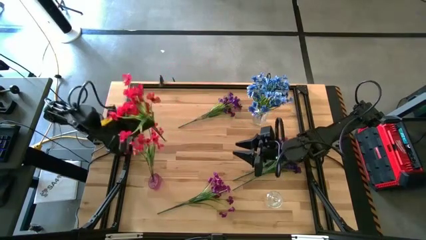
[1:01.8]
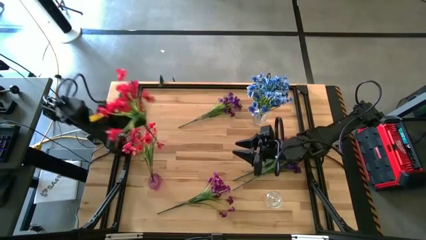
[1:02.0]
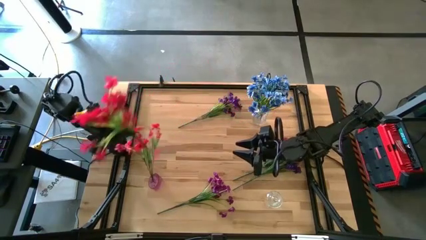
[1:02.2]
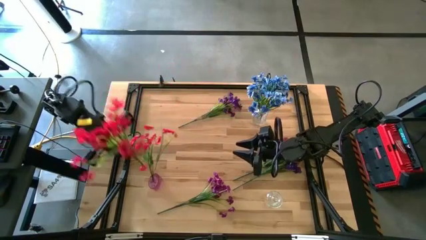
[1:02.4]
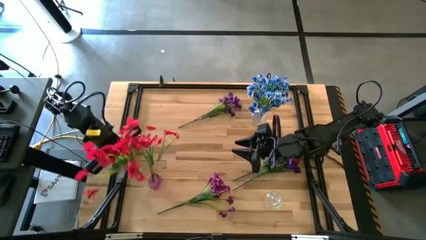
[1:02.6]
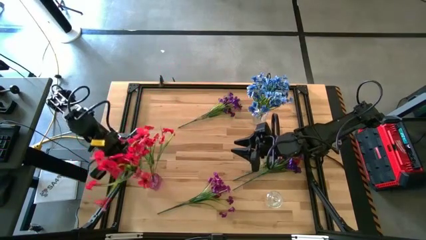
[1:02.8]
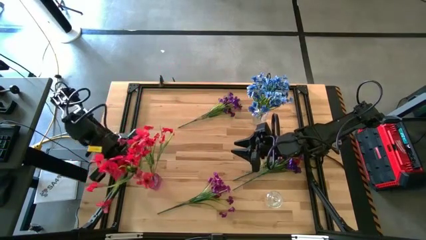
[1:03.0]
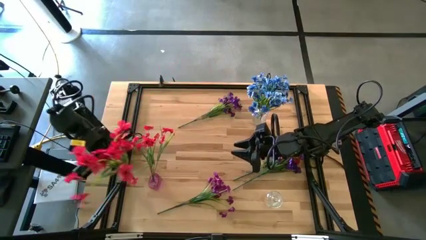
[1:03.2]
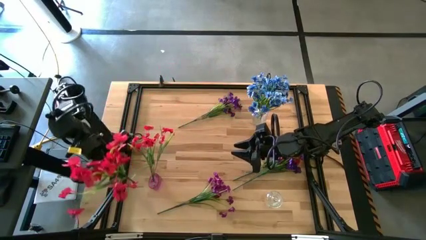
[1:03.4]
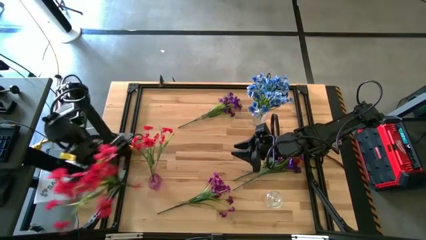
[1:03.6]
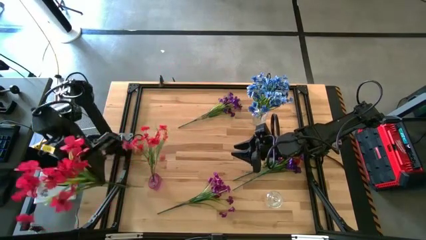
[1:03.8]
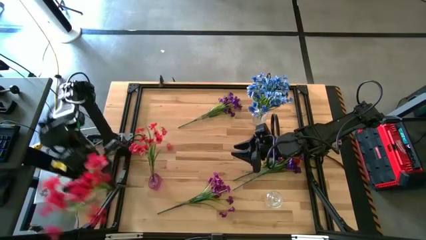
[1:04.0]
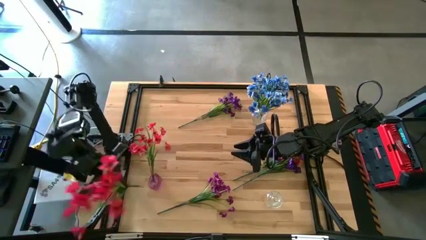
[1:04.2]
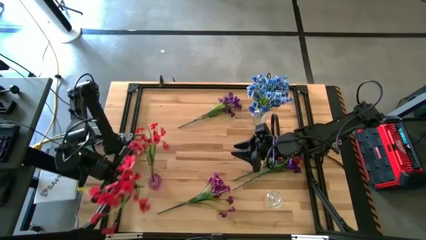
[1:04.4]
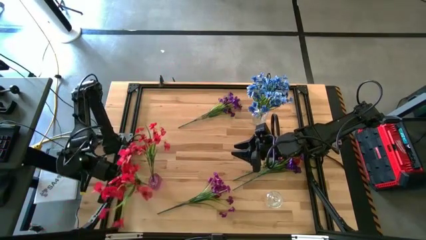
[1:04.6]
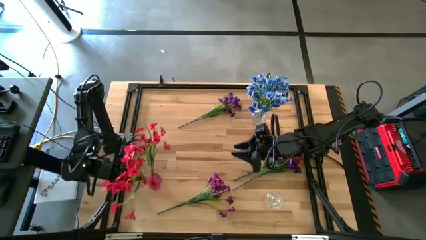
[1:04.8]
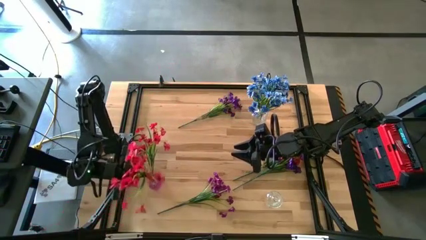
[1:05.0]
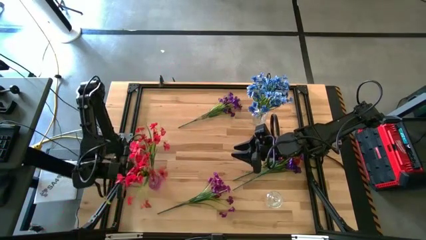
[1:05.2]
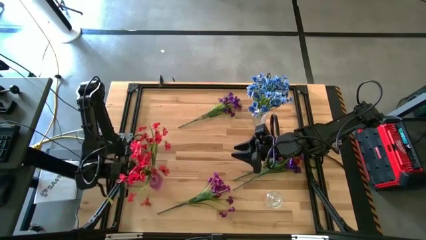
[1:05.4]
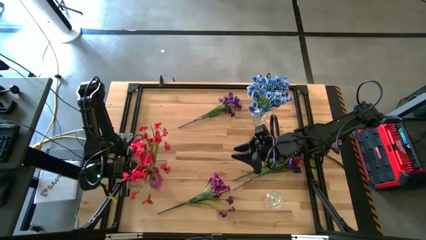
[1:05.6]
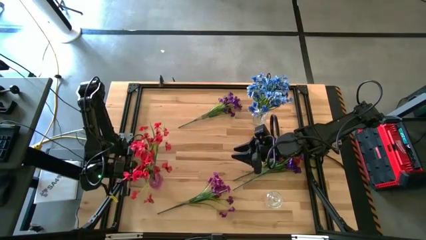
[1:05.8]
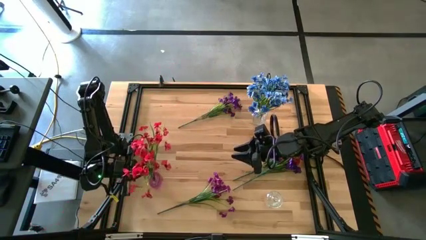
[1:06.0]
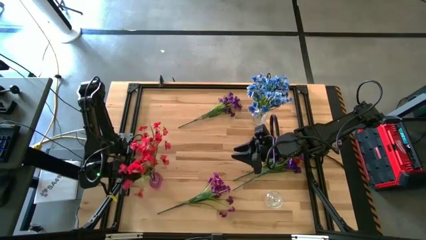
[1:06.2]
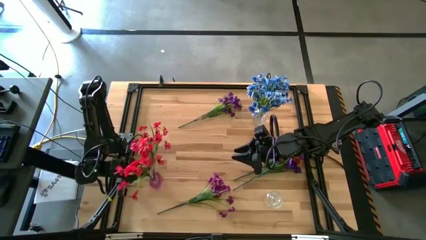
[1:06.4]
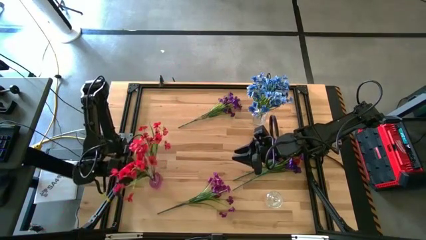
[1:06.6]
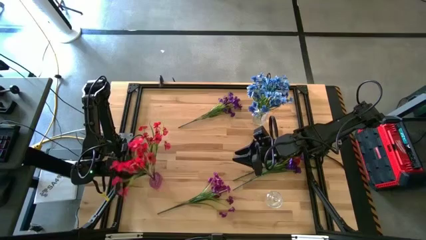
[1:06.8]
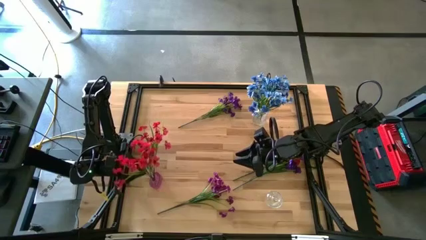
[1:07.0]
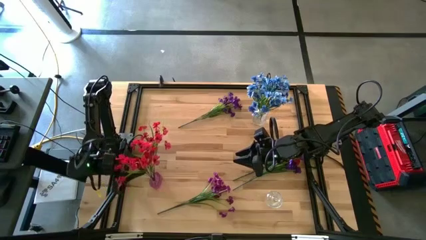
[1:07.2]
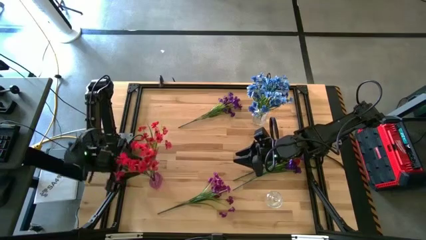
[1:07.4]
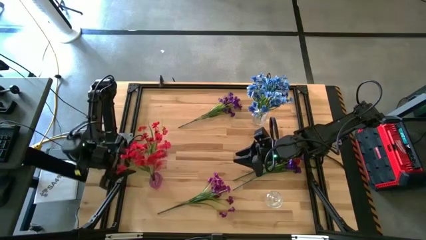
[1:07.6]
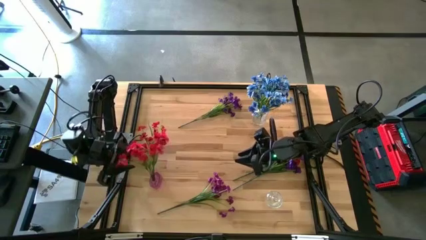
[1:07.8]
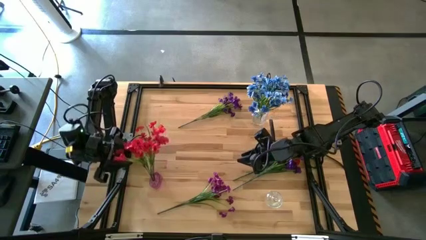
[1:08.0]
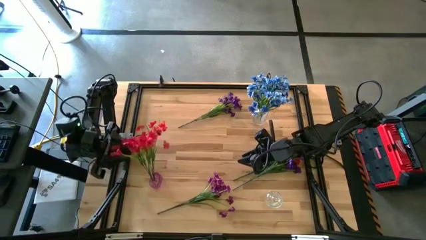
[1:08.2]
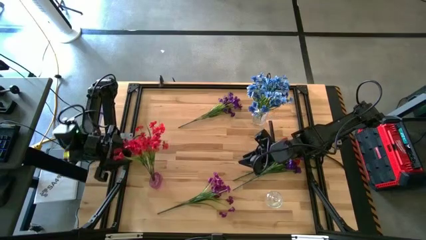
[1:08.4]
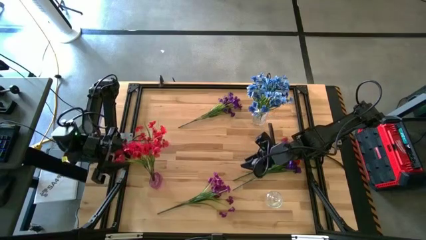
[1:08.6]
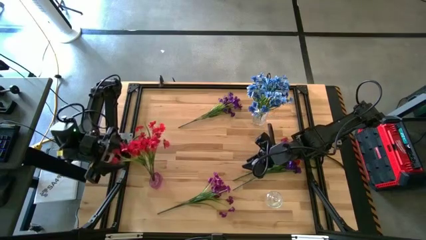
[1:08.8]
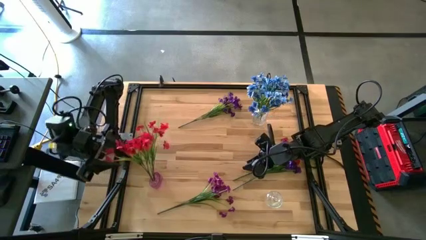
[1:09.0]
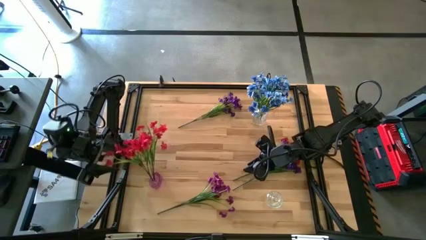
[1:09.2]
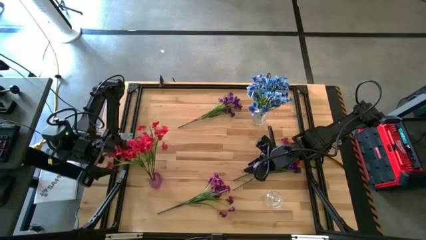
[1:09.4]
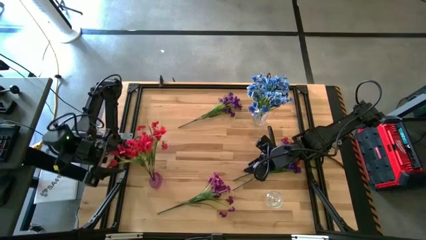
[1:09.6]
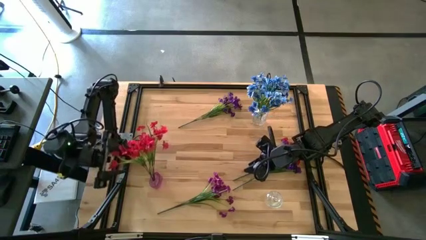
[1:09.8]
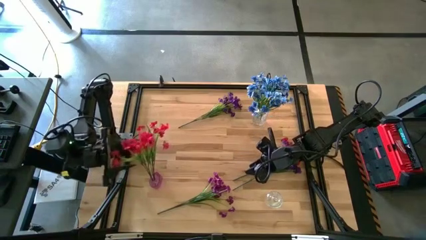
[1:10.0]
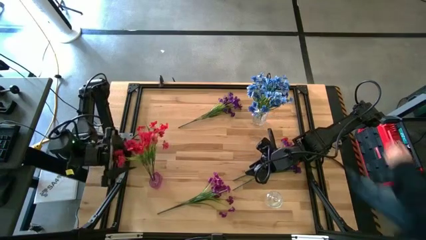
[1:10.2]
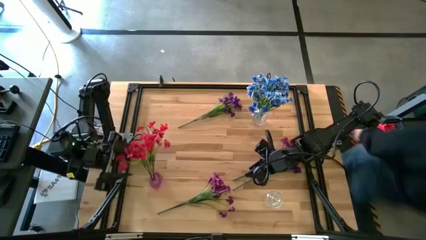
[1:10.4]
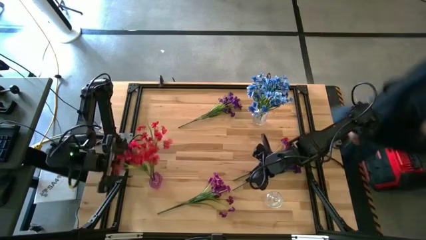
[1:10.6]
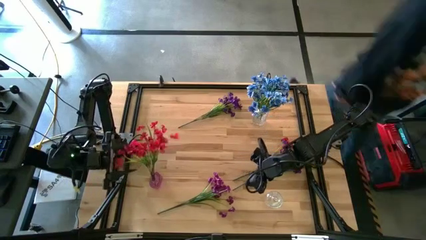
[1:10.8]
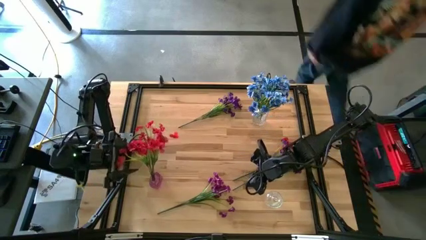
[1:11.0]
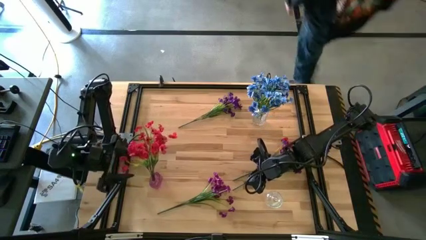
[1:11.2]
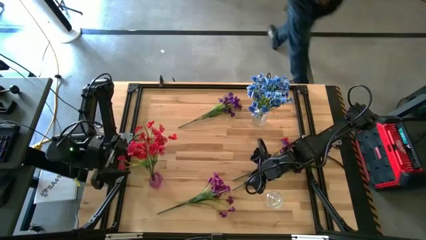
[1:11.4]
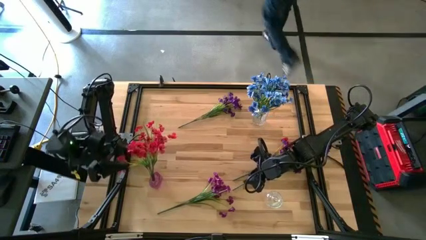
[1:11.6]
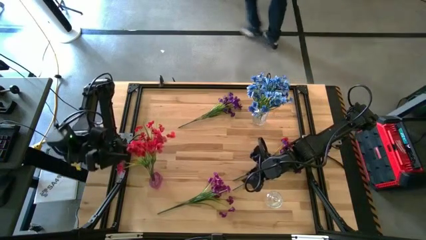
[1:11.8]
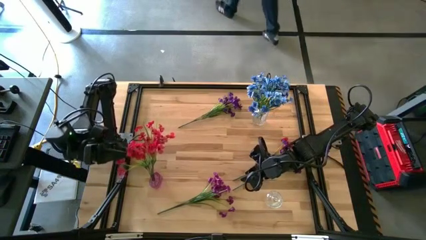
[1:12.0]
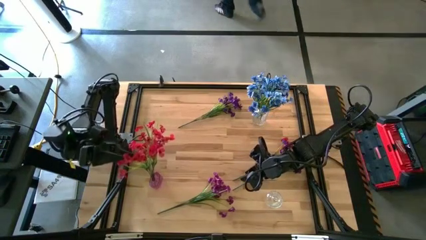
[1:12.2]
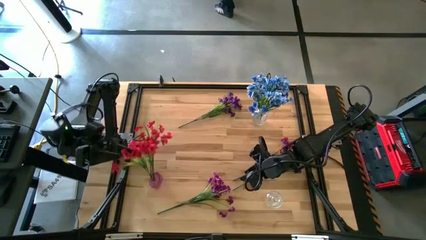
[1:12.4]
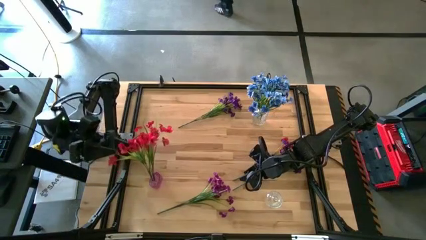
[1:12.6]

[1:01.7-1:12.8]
Task: Sort flowers into vase by color
Put the top red flower into the pink flower vase
